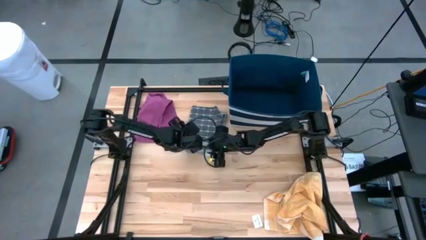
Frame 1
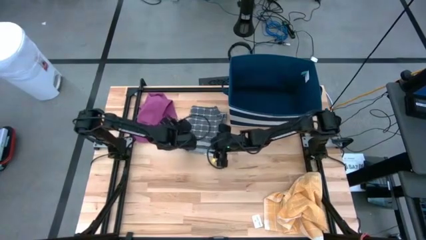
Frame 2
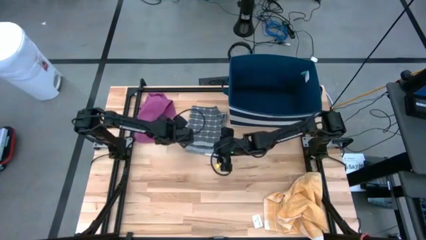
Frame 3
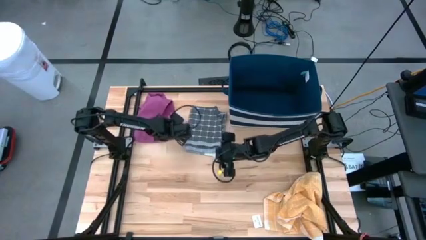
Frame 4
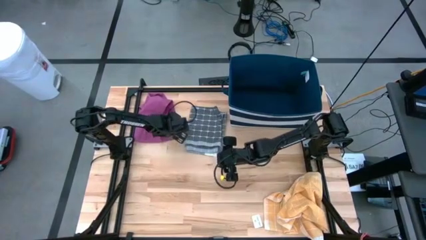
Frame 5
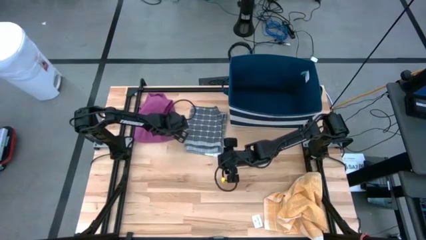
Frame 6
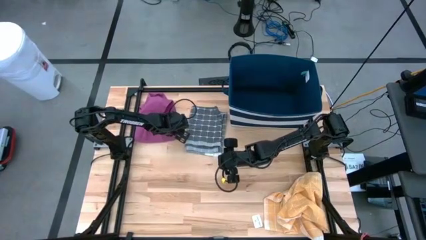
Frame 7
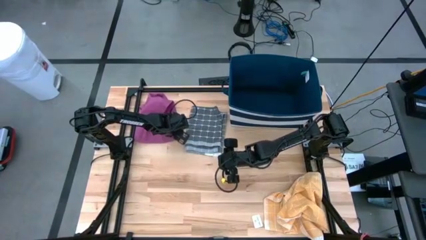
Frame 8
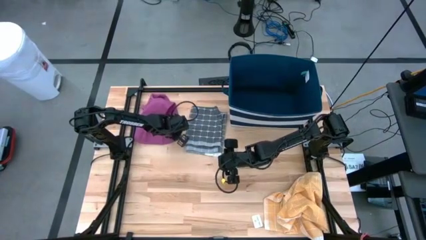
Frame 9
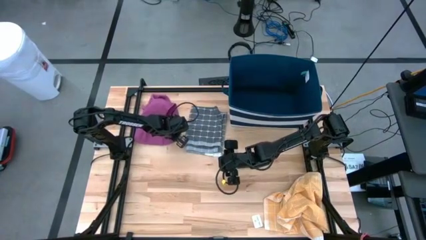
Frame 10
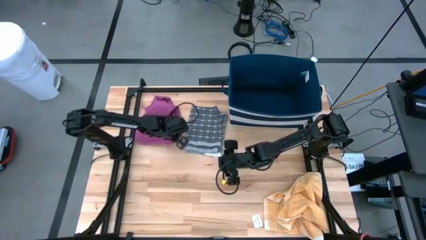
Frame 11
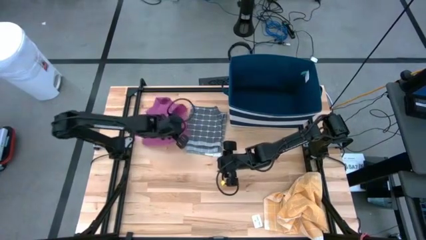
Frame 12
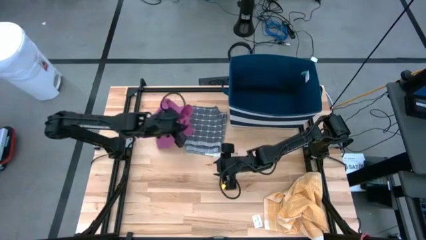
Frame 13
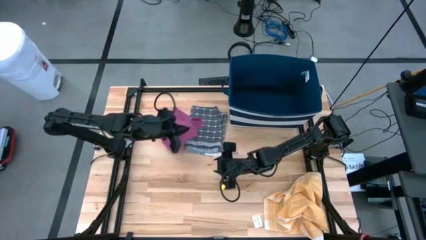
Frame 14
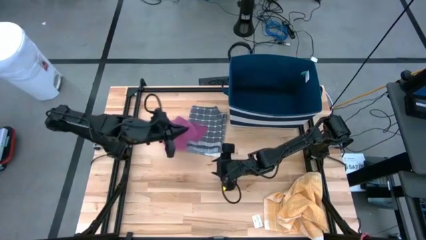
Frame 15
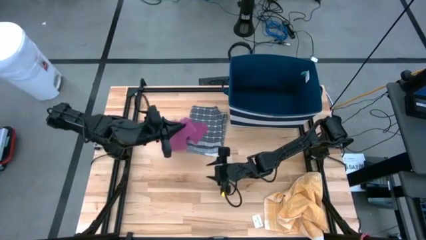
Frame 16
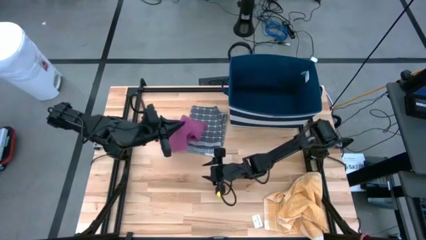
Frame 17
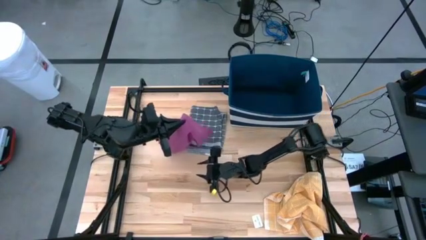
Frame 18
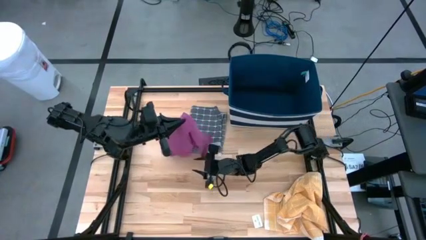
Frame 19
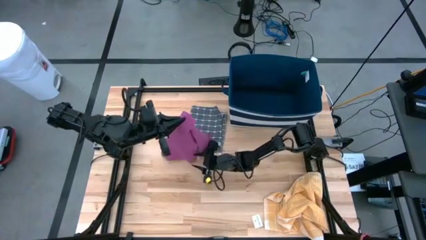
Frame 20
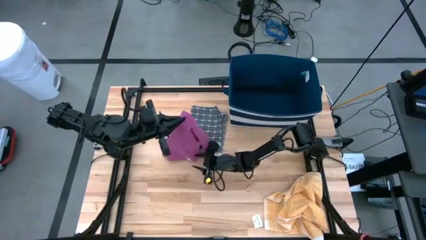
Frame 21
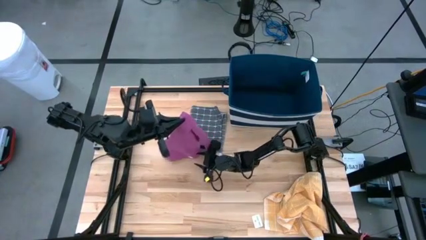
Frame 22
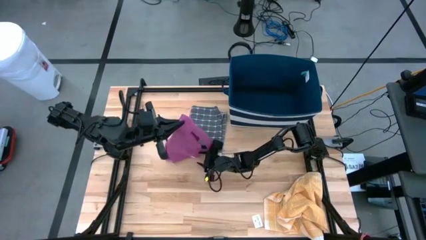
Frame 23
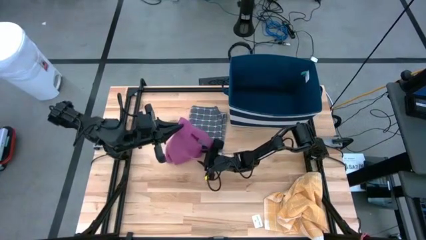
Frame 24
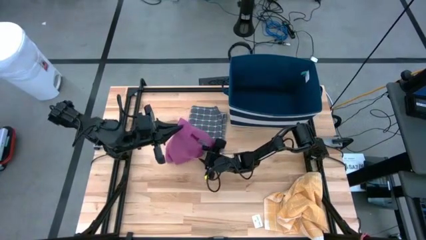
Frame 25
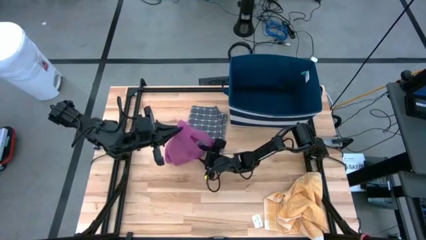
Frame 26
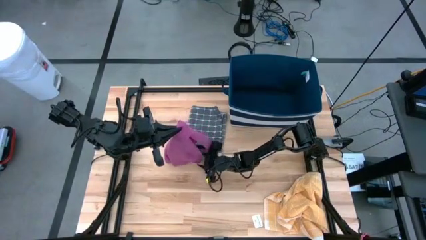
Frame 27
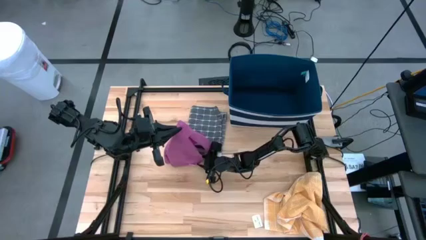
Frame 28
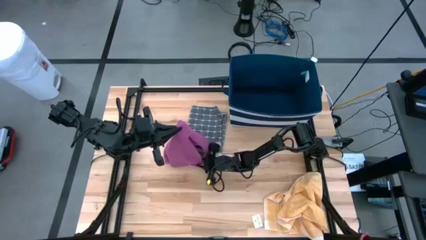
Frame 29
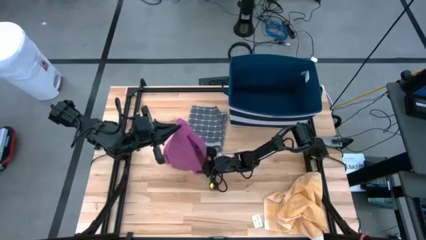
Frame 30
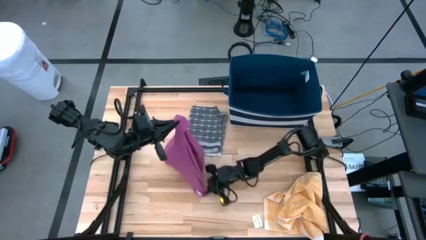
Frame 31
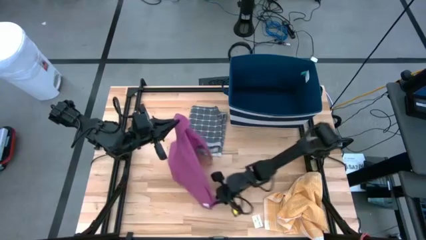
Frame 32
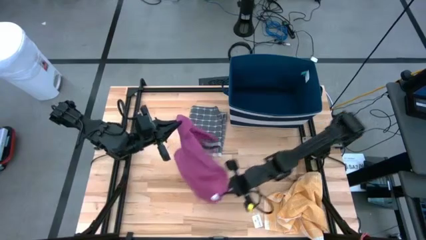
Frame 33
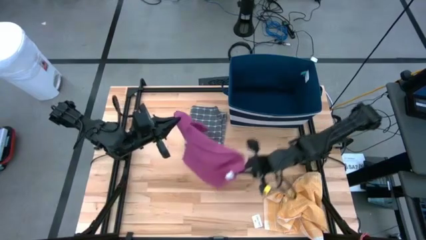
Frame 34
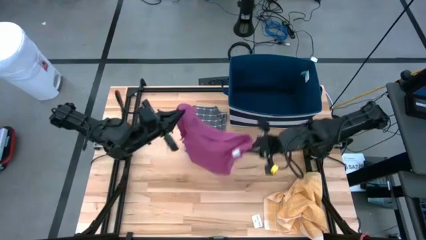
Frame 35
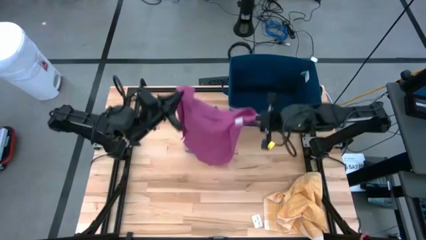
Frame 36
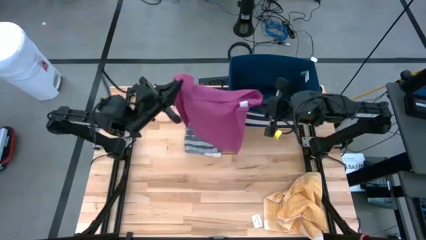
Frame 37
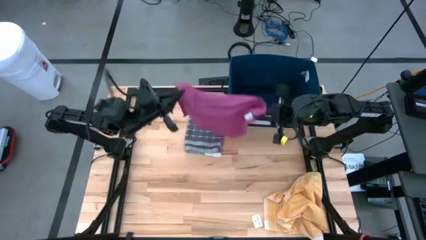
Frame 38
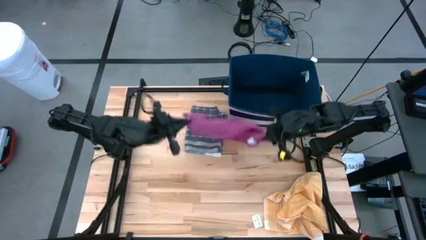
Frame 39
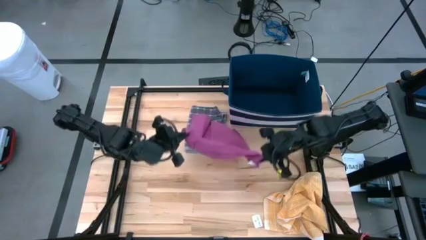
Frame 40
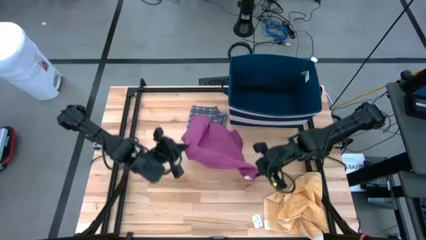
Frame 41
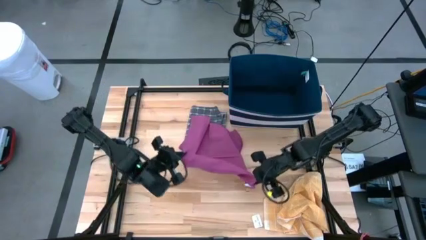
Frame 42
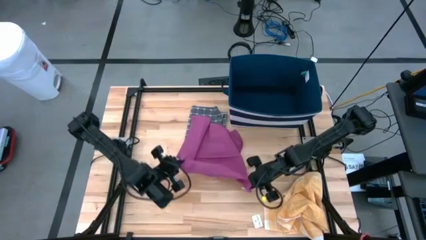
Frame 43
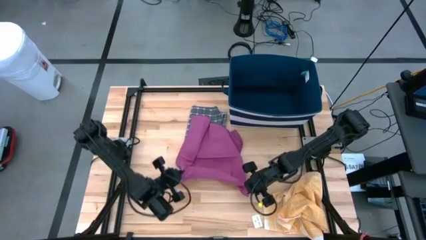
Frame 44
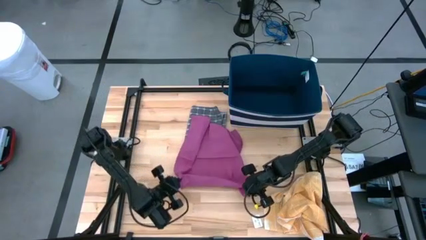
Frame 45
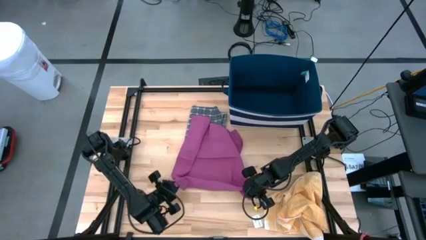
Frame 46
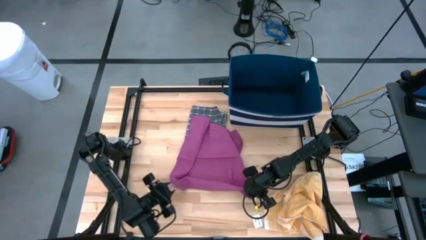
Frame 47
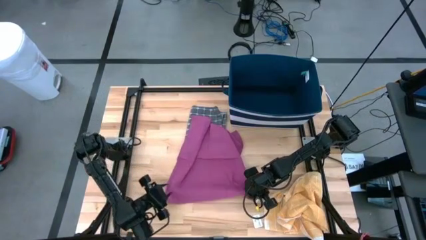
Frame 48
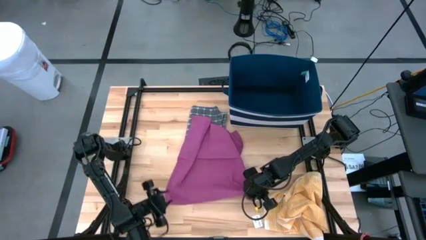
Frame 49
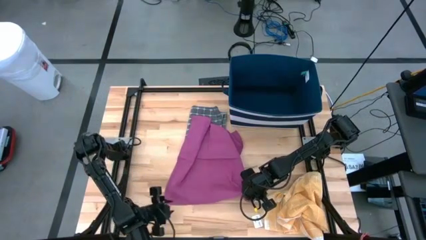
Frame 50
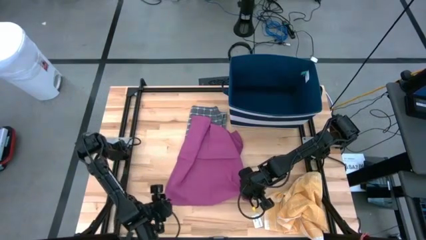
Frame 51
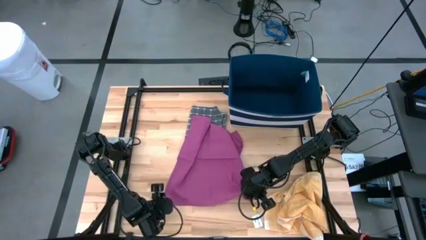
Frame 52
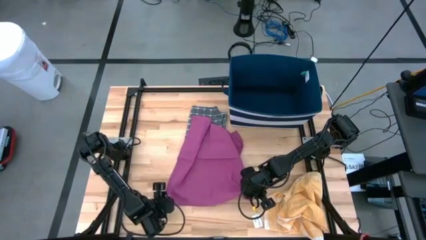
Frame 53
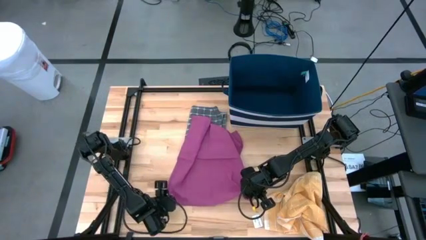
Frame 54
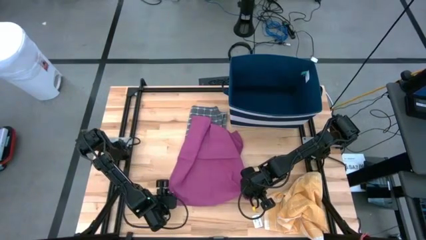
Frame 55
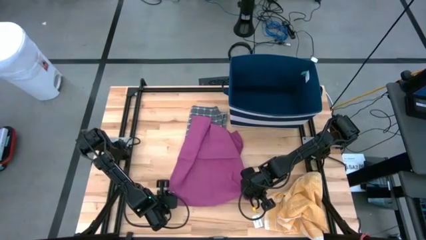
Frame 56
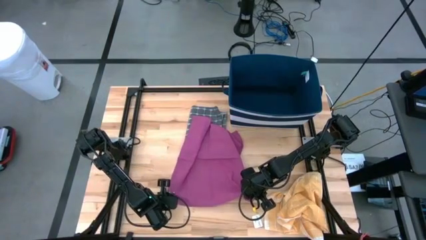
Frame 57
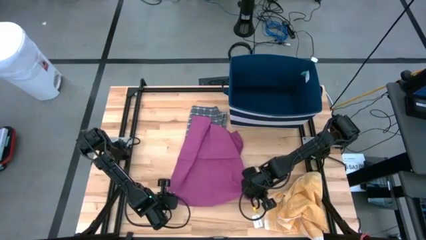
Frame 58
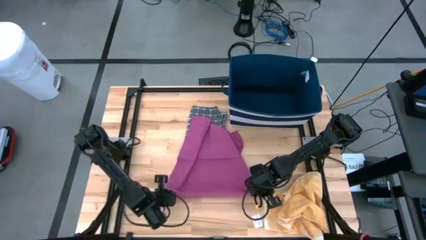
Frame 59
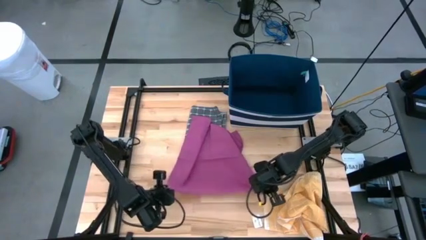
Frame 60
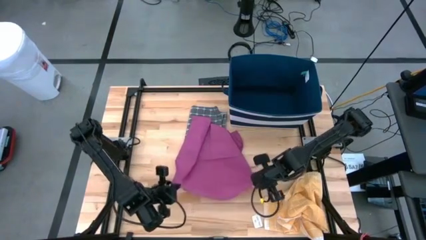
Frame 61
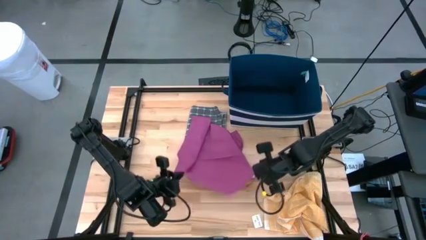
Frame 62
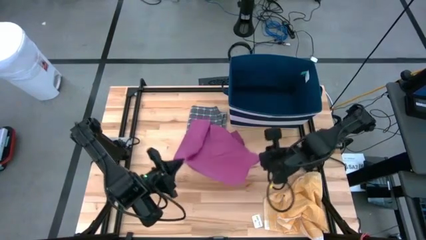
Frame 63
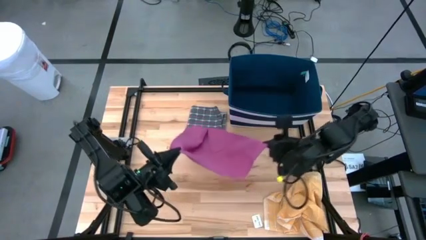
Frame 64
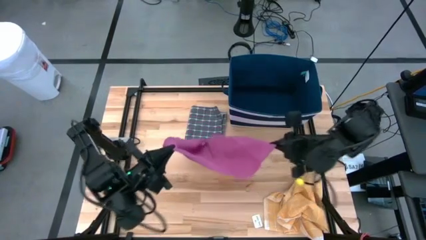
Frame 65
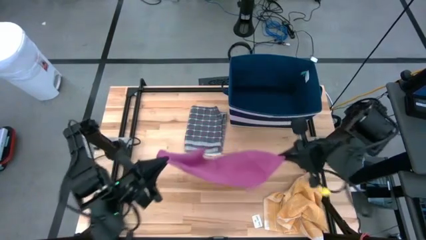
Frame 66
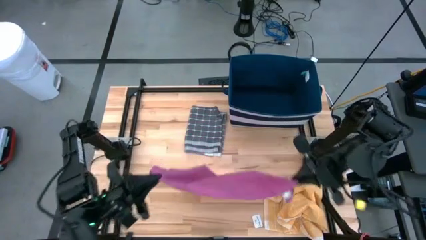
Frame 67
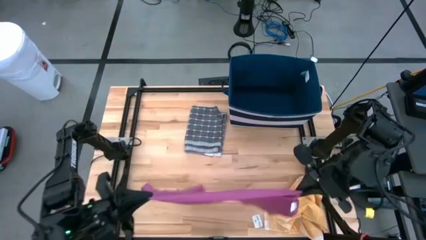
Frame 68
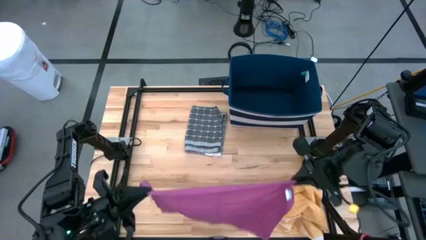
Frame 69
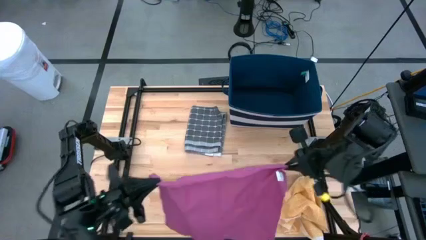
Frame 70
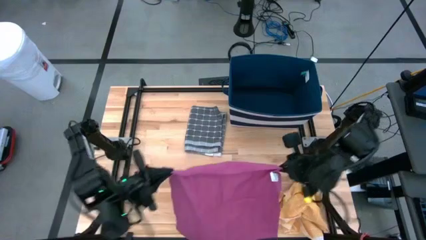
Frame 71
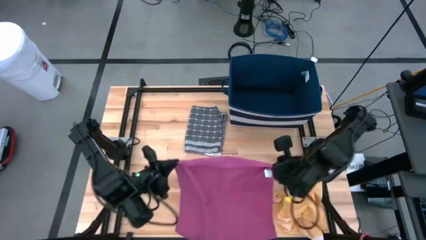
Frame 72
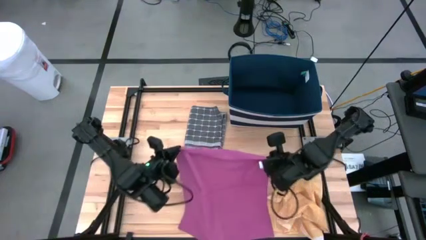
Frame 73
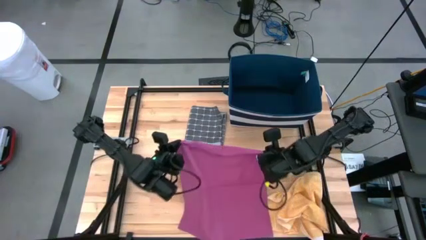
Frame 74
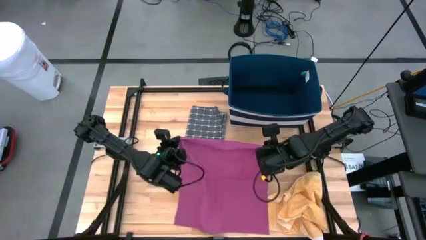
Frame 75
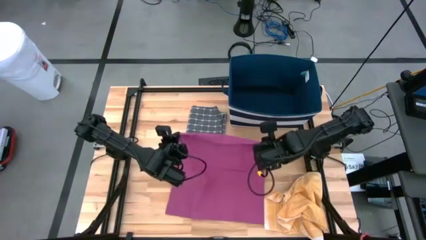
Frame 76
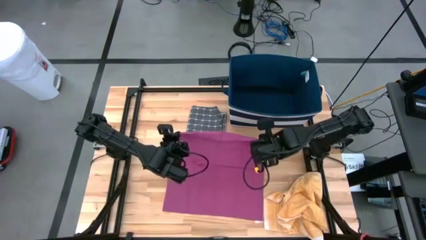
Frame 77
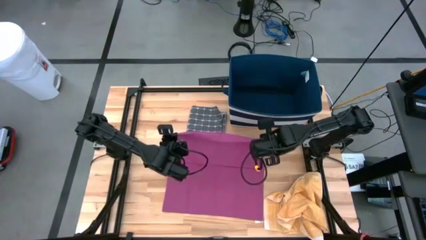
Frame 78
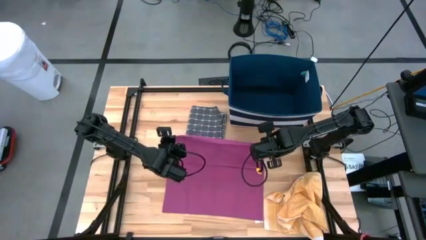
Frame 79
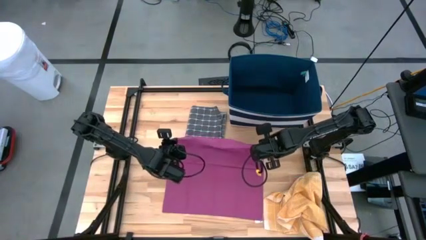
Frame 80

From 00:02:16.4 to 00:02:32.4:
Task: Fold towel
Fold the pink towel
